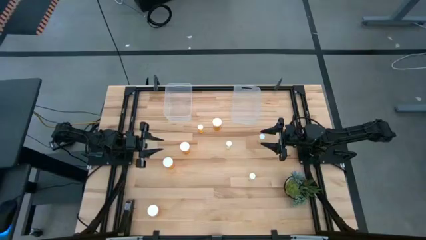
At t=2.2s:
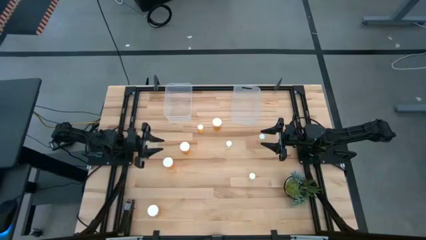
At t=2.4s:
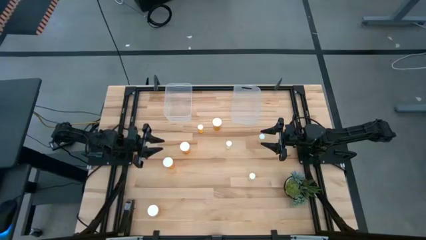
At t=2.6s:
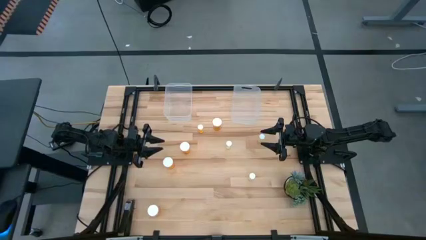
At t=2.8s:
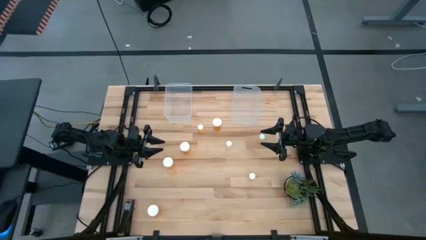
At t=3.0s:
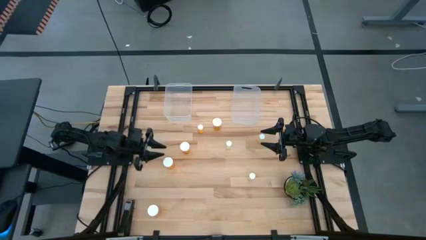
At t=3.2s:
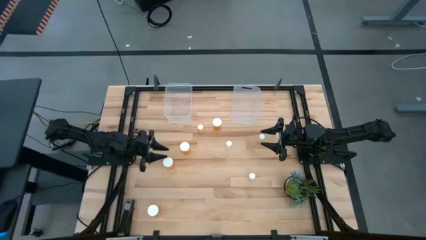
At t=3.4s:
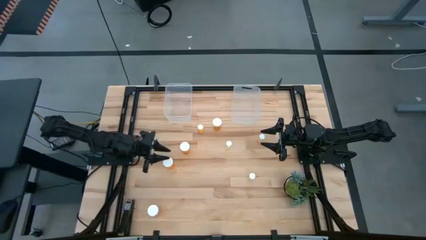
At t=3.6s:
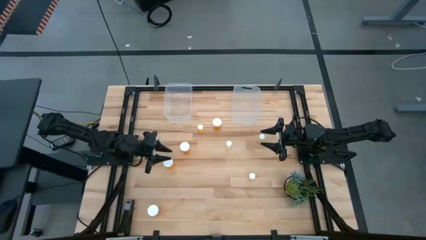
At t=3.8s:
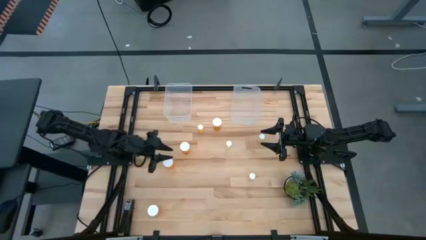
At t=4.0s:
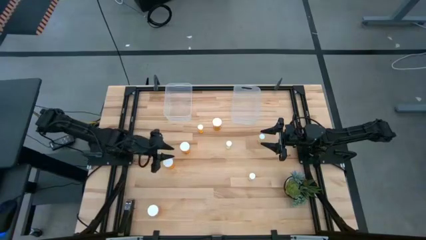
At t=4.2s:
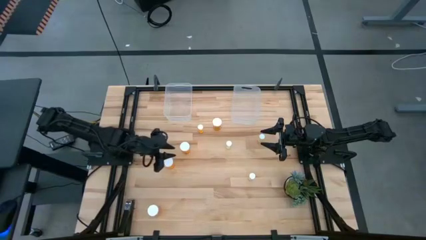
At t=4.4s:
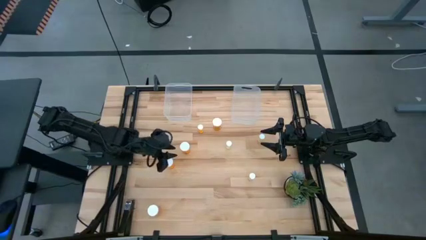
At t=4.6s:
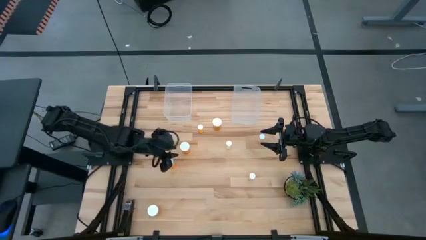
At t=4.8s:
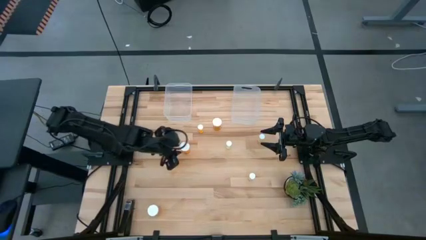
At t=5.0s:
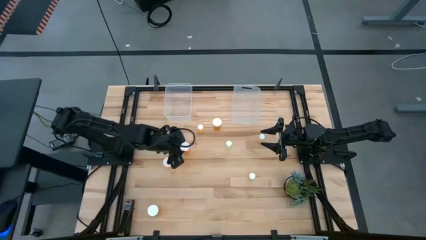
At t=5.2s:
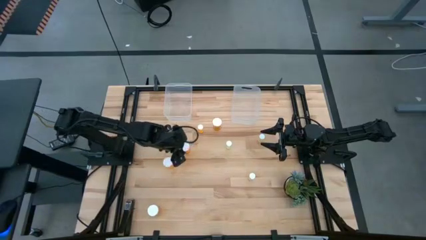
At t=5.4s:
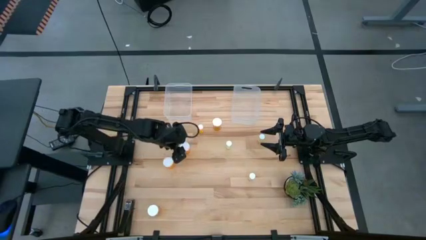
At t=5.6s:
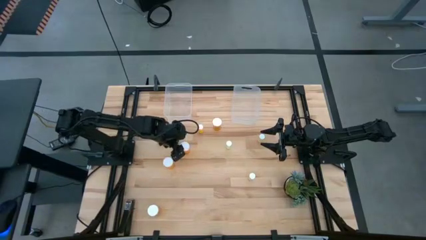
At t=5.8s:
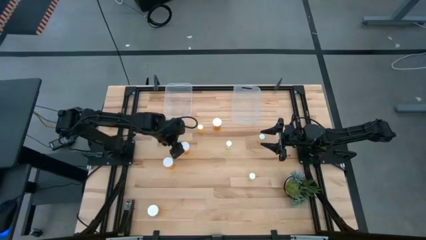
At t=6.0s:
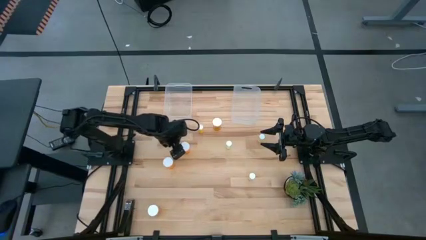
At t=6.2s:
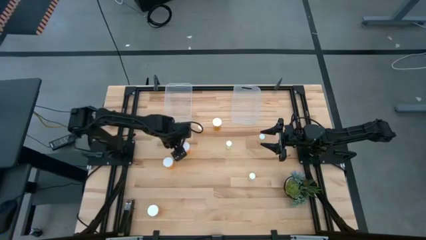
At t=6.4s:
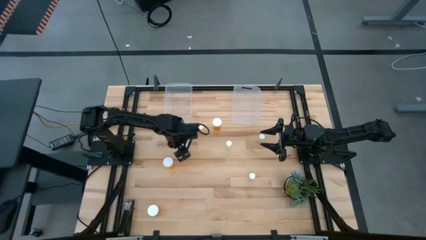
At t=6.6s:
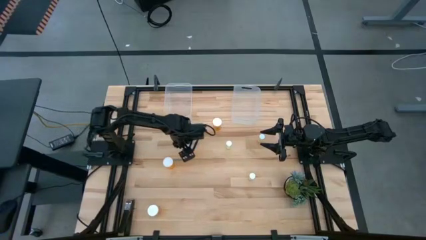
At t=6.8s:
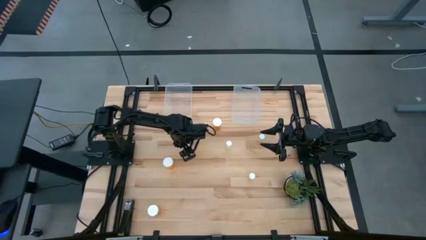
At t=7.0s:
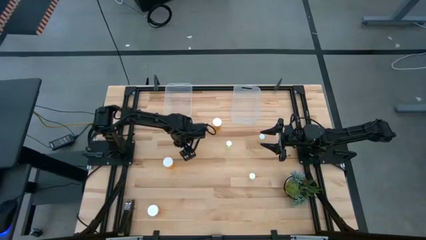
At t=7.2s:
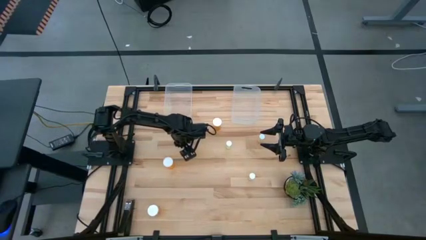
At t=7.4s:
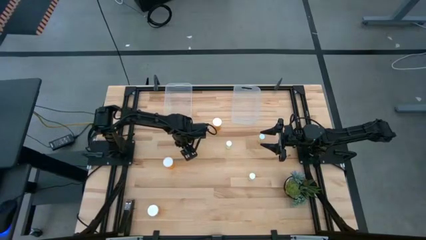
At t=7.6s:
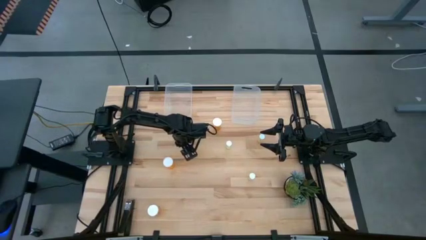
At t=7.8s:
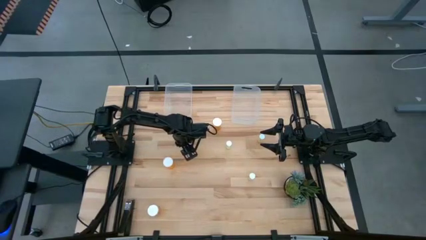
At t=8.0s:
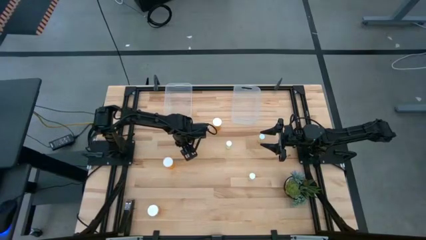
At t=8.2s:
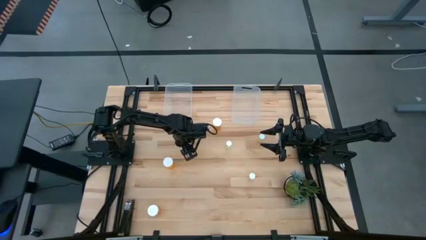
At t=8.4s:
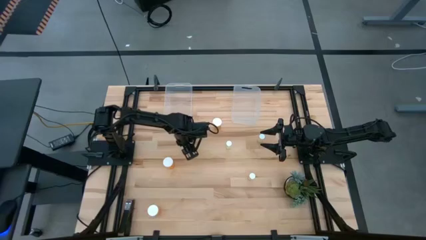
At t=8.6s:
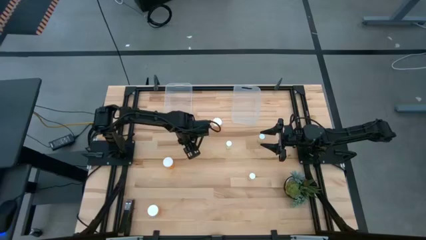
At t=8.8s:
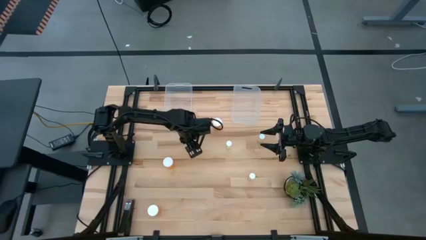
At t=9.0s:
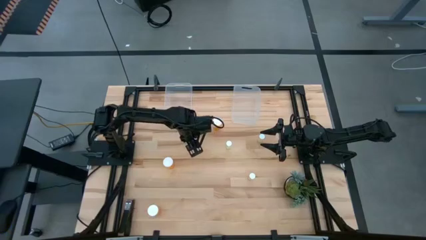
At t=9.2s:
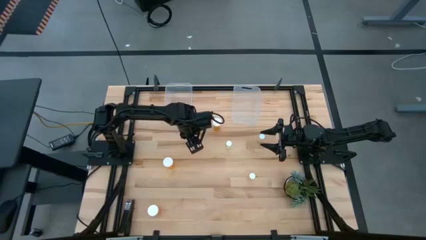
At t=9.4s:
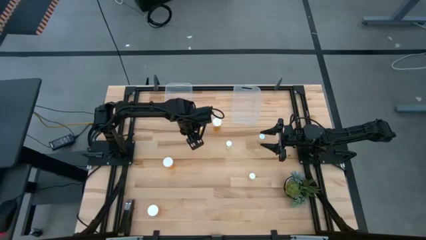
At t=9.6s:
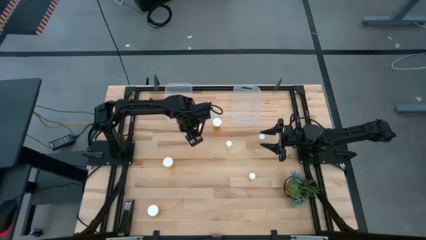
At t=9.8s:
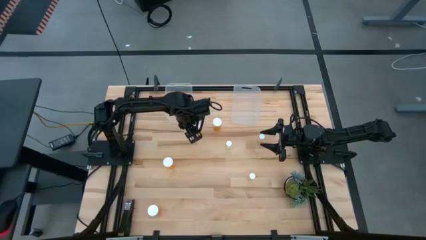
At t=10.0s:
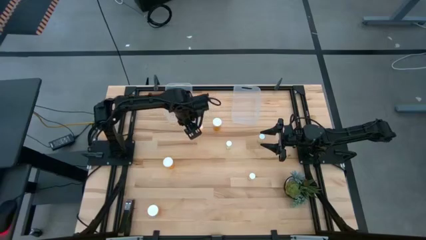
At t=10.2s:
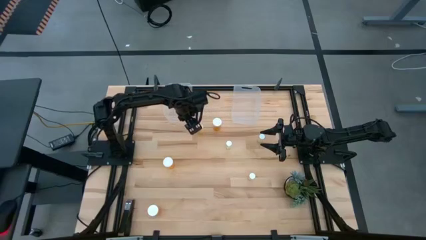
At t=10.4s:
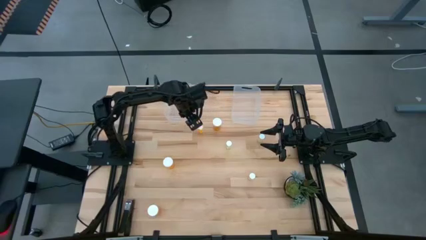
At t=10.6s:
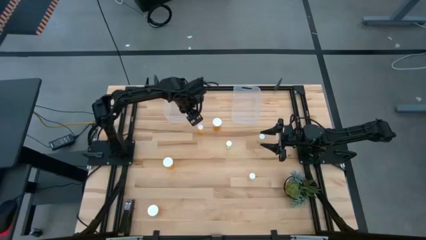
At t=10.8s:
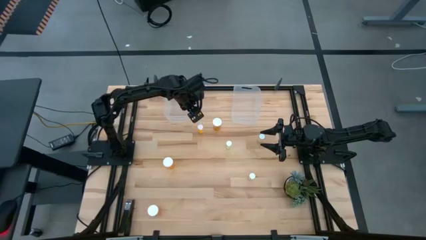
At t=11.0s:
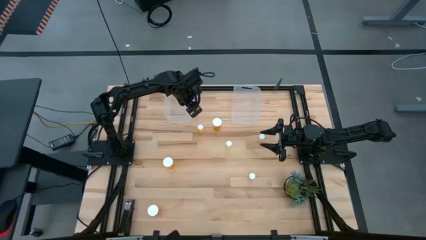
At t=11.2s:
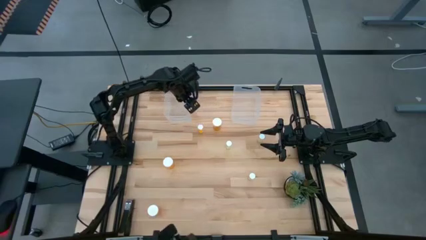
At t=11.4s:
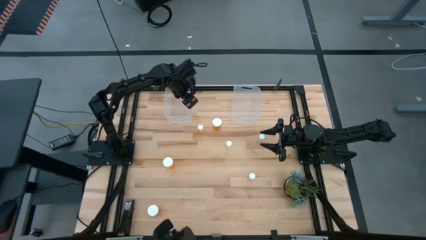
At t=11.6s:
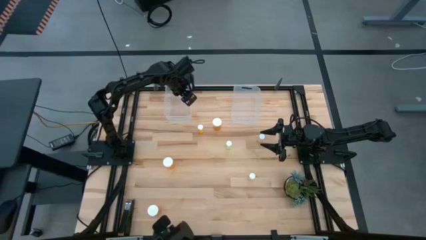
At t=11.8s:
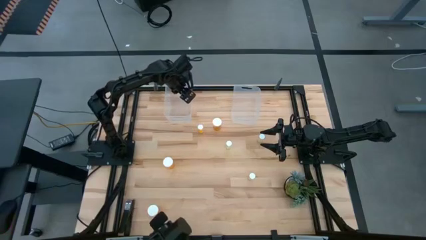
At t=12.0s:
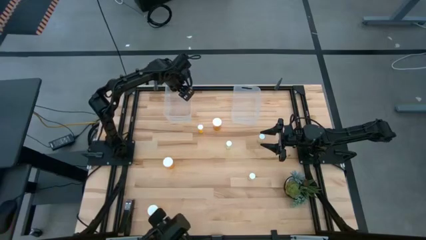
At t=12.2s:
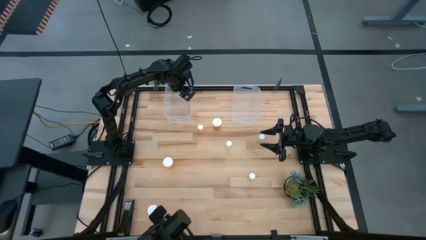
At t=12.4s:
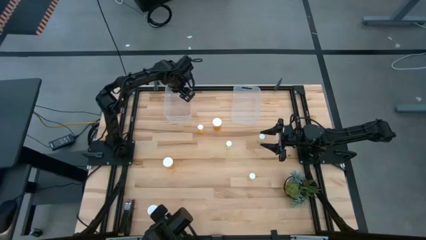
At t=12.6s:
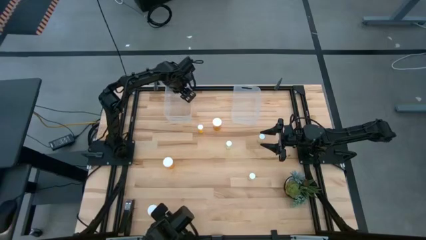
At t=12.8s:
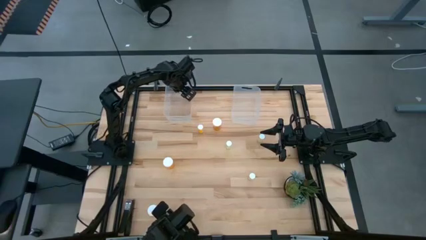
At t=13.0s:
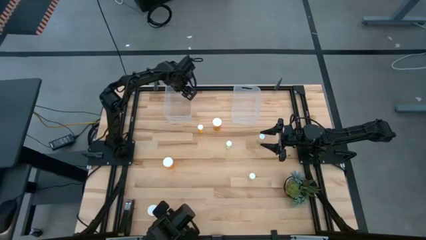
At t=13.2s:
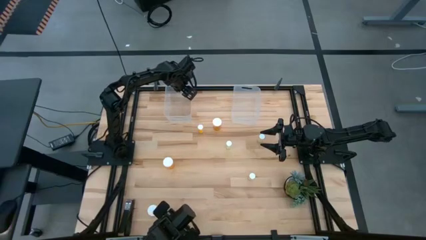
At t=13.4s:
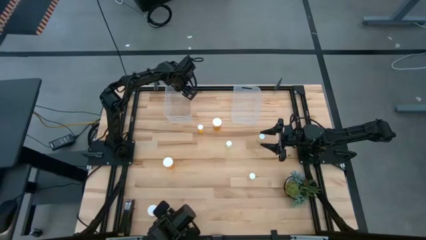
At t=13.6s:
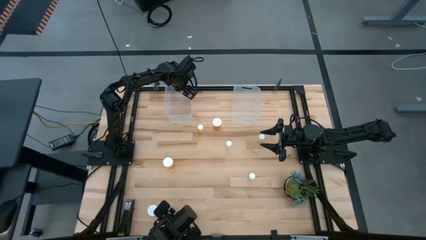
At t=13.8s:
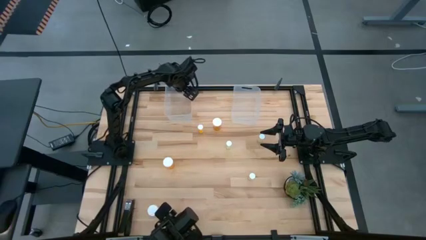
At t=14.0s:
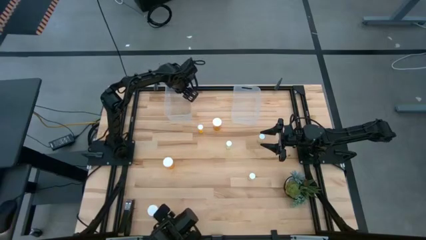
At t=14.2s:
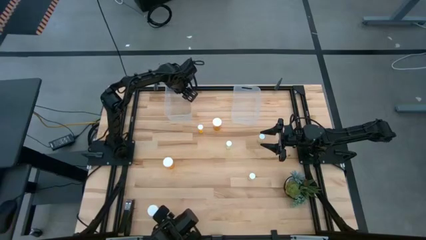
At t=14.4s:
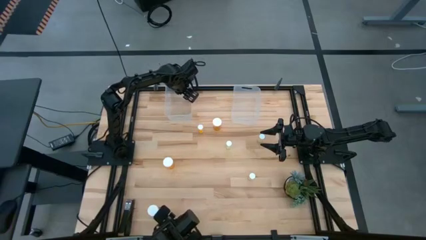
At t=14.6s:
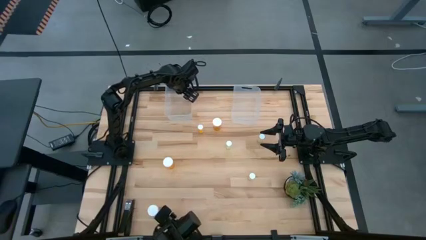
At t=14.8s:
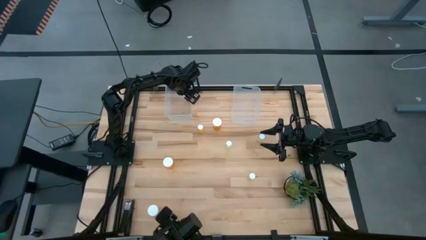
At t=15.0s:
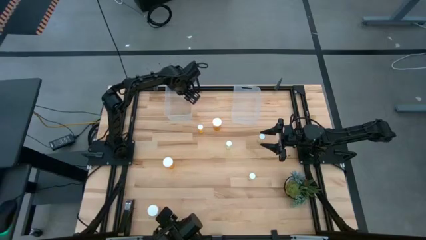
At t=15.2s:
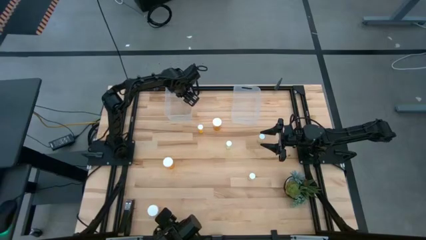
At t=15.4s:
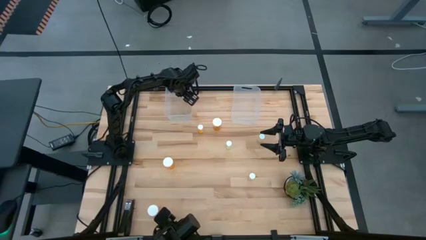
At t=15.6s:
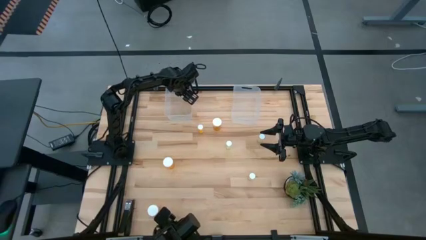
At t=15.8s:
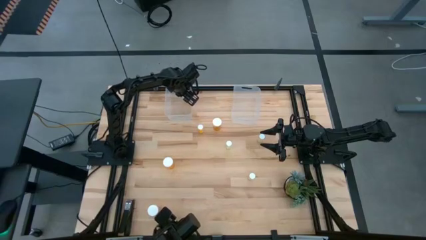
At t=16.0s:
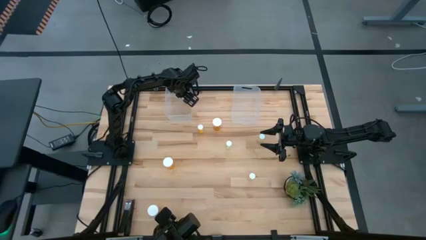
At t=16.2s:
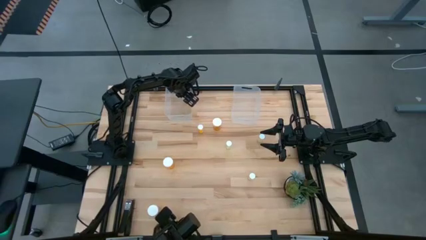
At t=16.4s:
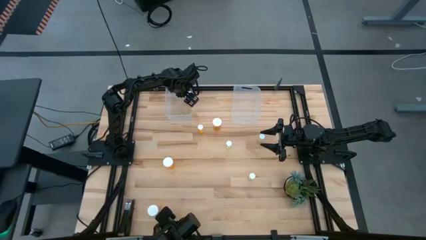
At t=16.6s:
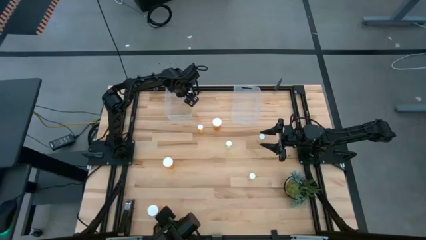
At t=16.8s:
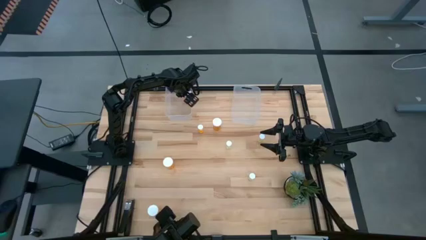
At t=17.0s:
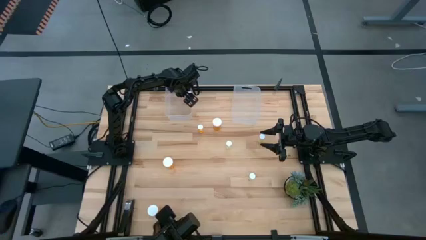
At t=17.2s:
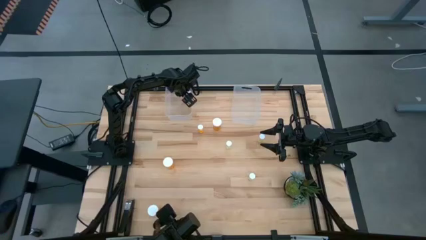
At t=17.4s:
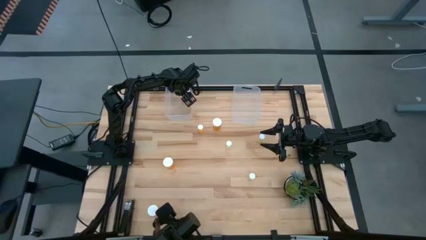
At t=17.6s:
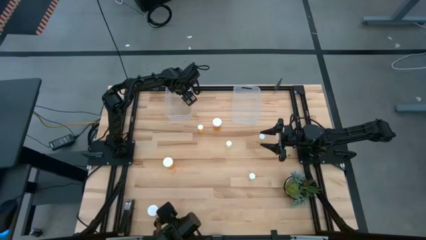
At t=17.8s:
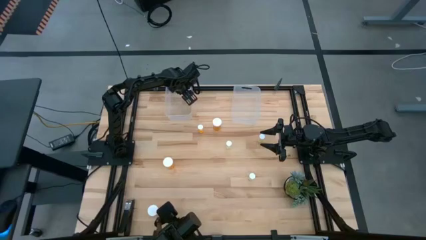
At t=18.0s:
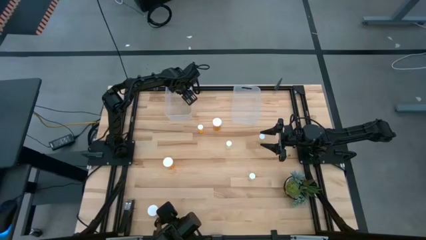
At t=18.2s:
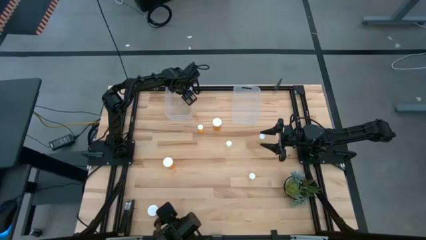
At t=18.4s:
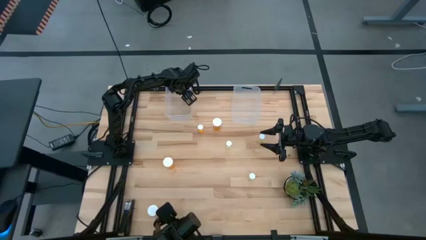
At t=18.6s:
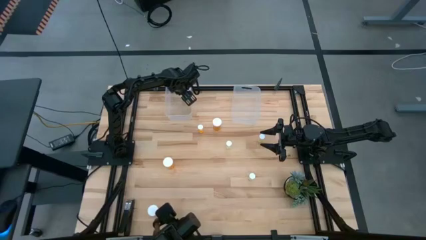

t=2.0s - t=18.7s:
Task: Pick and place medicine bottles into bin by pill shape (circle, oval)
Put the large orange pill bottle into the left transparent bin
